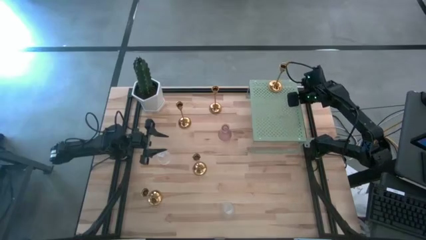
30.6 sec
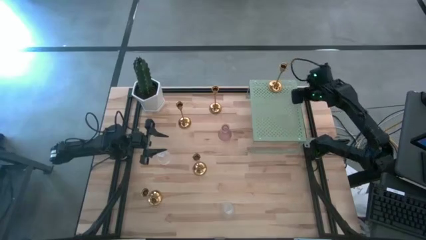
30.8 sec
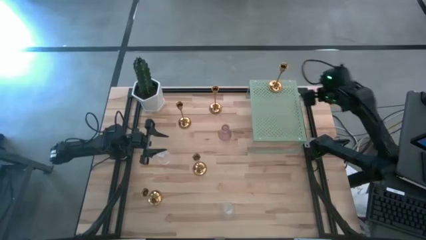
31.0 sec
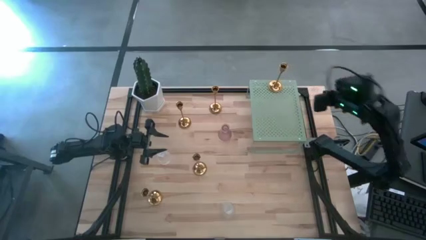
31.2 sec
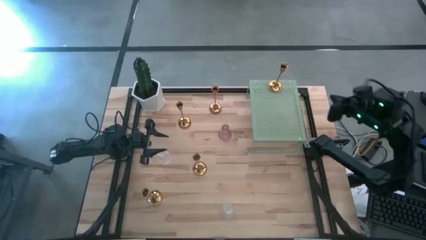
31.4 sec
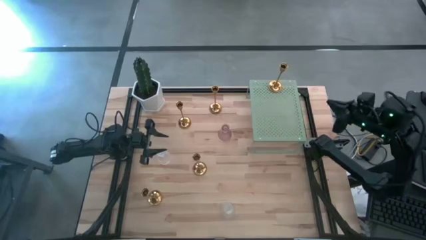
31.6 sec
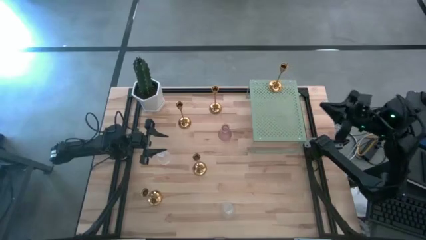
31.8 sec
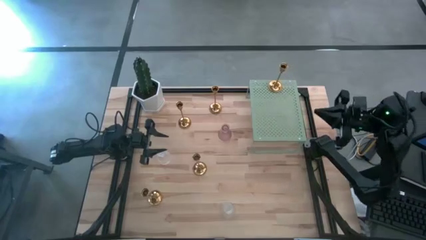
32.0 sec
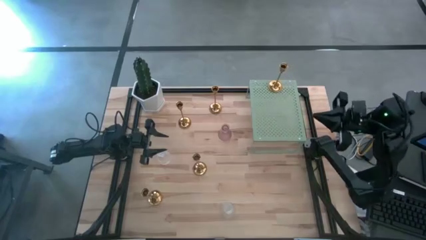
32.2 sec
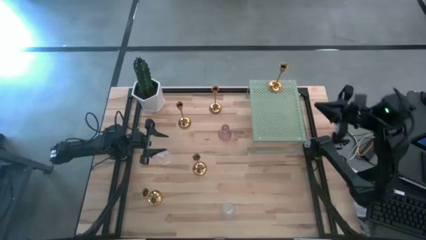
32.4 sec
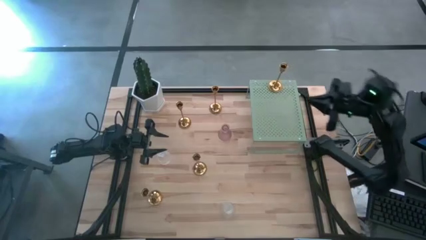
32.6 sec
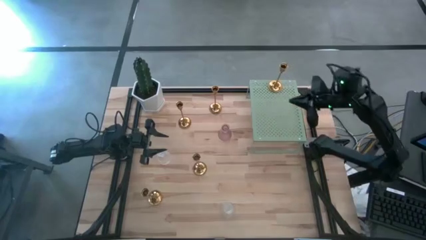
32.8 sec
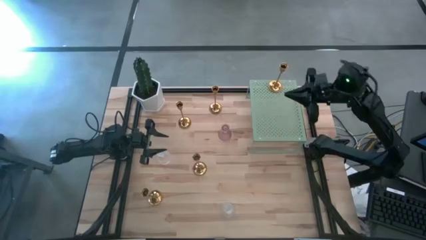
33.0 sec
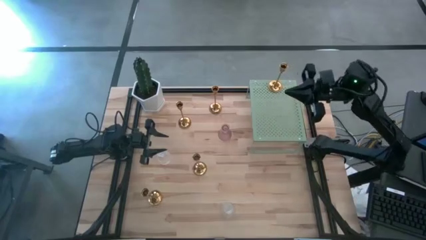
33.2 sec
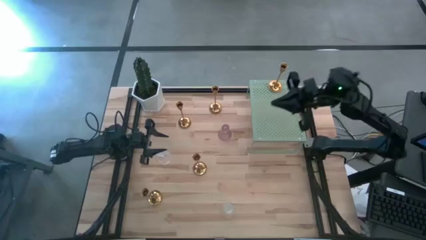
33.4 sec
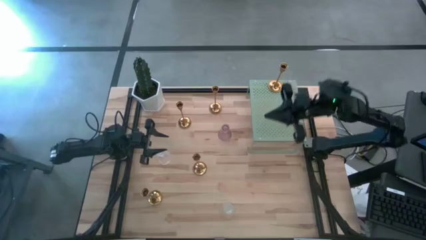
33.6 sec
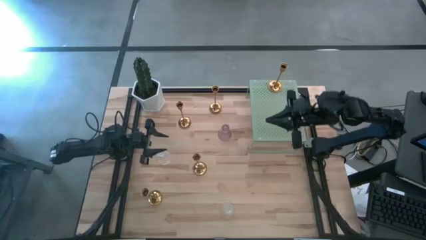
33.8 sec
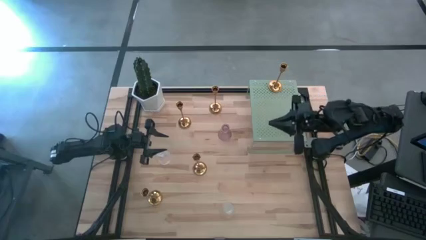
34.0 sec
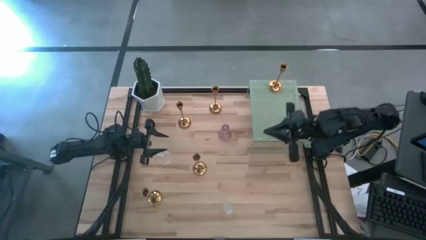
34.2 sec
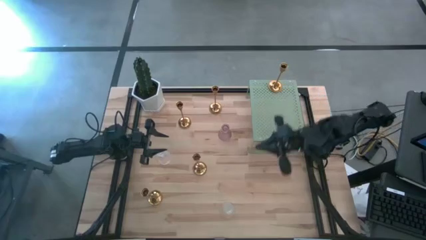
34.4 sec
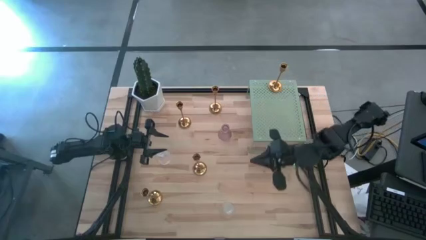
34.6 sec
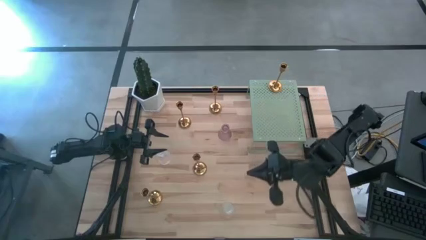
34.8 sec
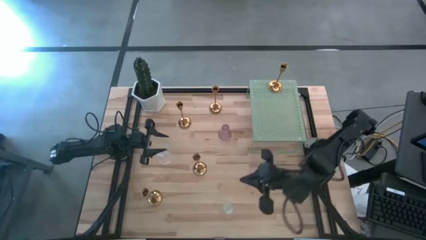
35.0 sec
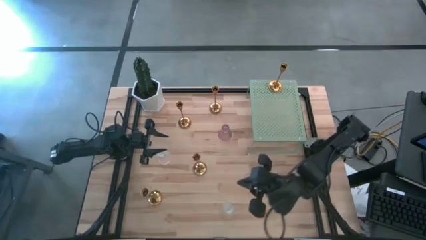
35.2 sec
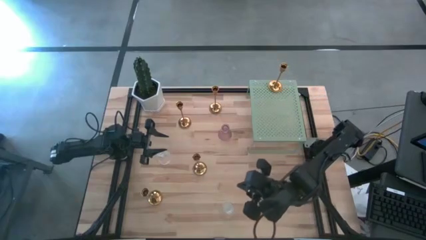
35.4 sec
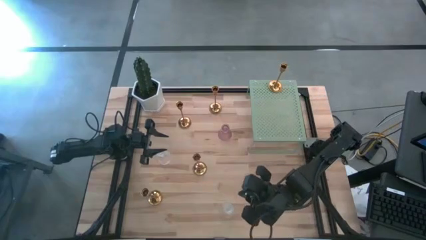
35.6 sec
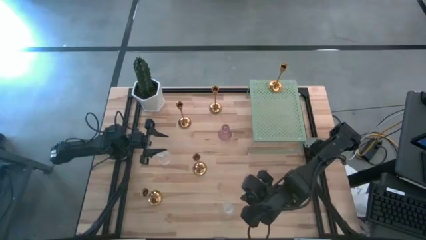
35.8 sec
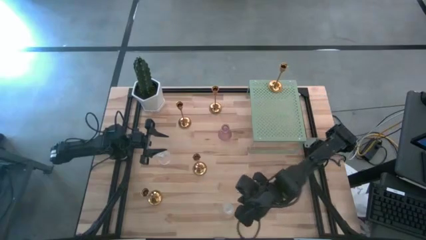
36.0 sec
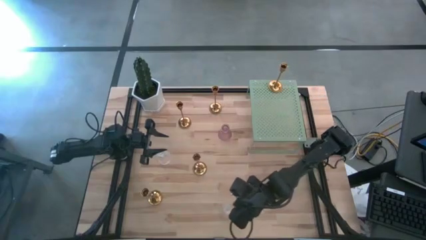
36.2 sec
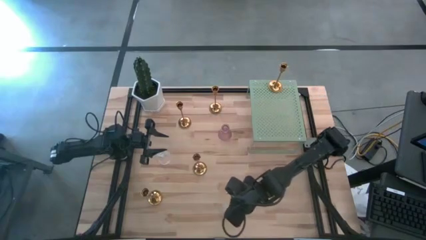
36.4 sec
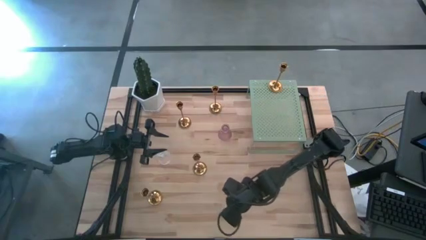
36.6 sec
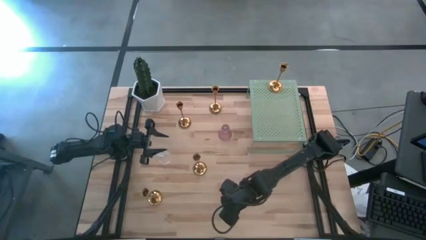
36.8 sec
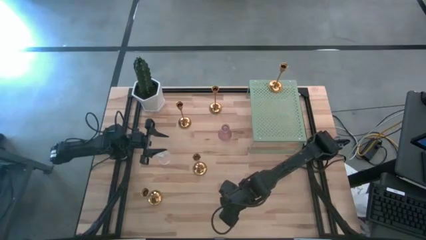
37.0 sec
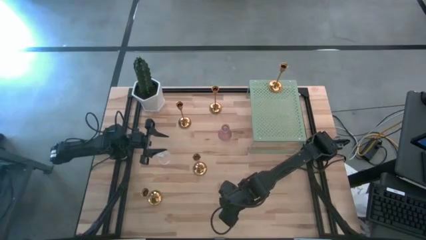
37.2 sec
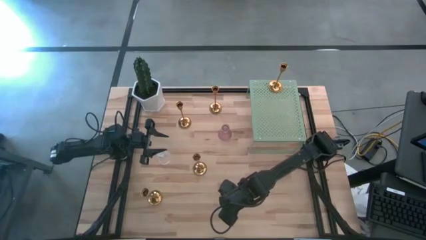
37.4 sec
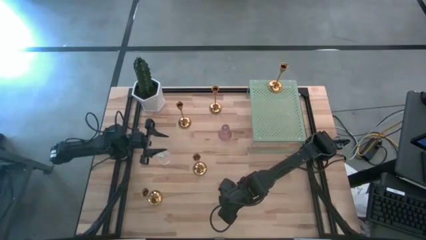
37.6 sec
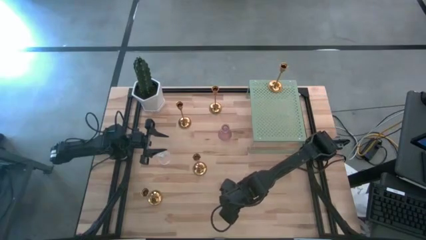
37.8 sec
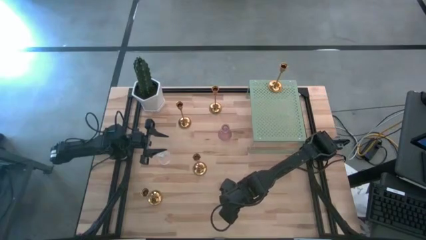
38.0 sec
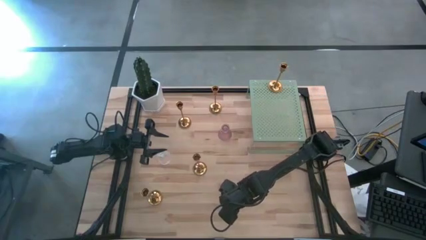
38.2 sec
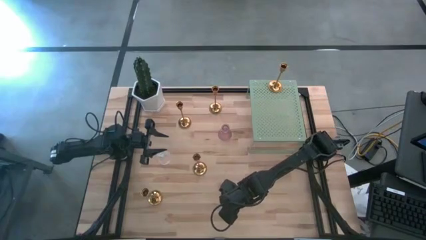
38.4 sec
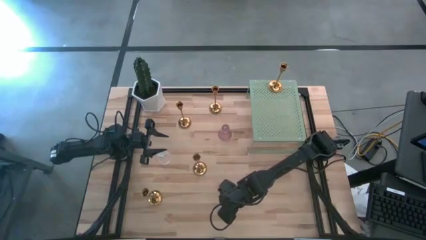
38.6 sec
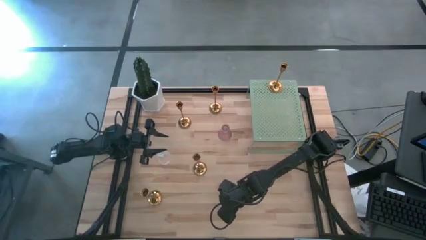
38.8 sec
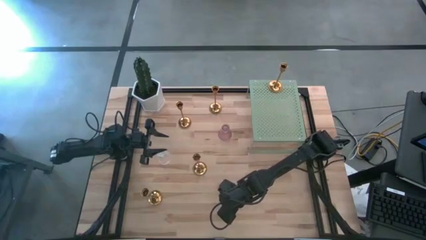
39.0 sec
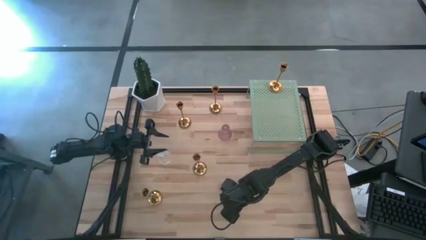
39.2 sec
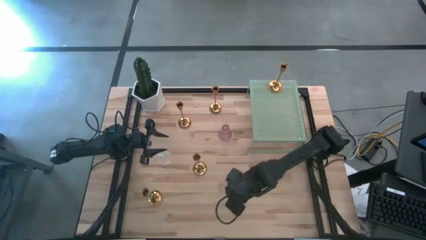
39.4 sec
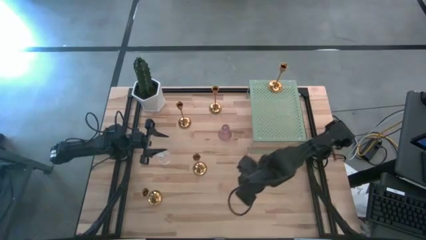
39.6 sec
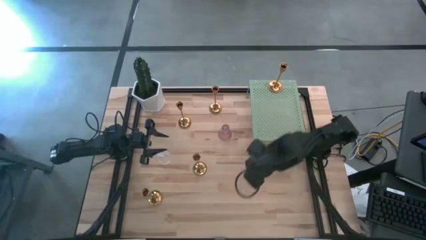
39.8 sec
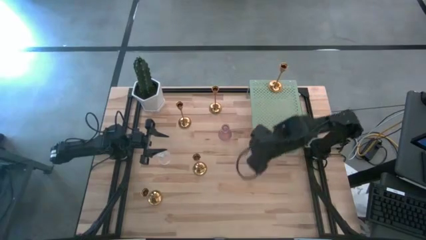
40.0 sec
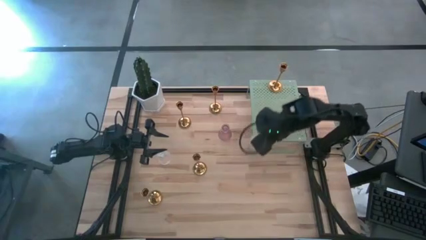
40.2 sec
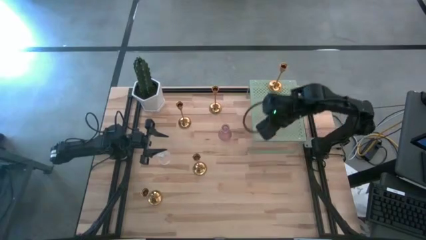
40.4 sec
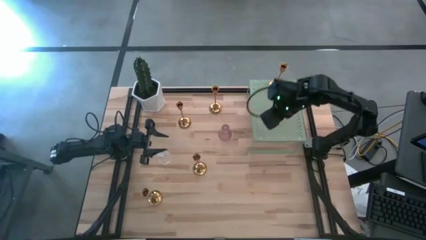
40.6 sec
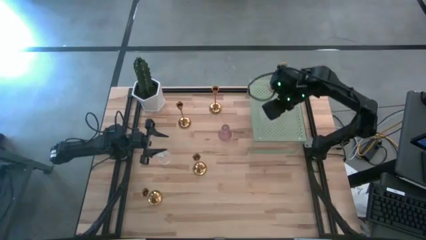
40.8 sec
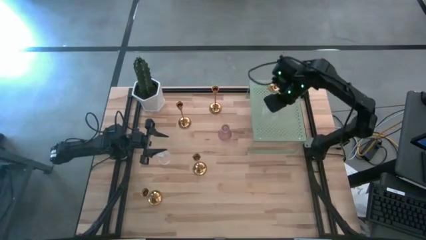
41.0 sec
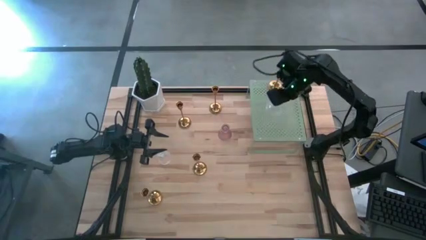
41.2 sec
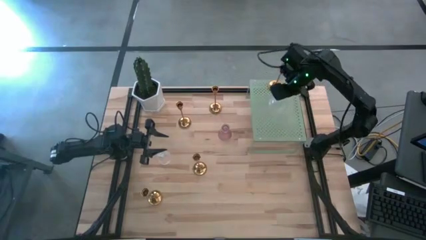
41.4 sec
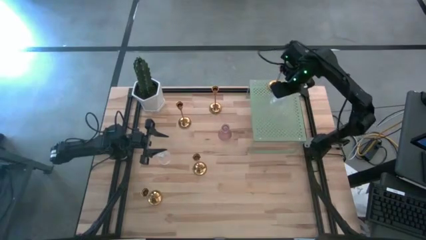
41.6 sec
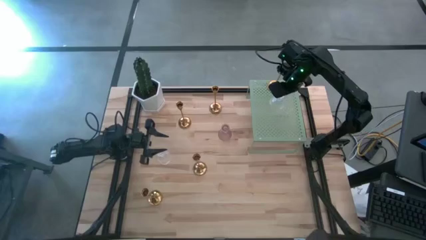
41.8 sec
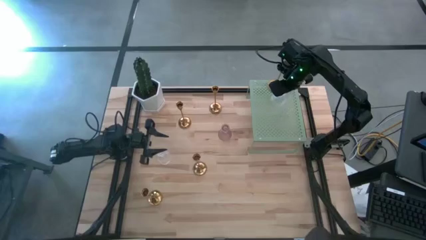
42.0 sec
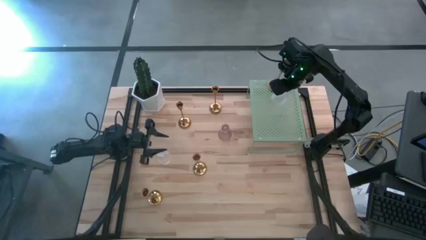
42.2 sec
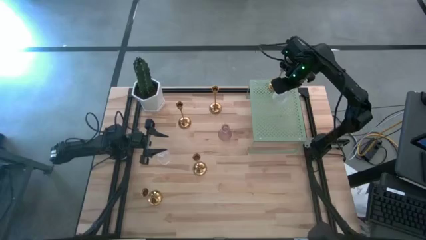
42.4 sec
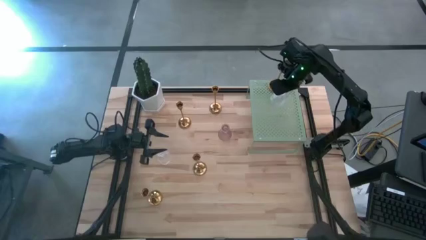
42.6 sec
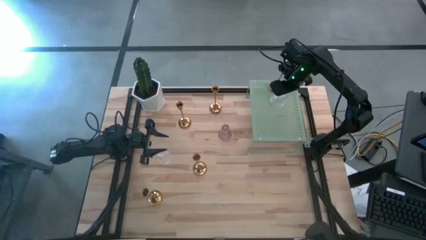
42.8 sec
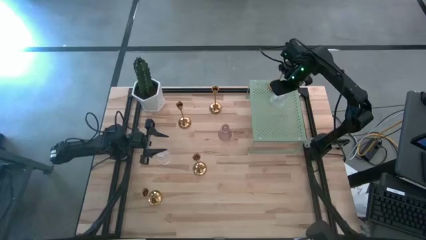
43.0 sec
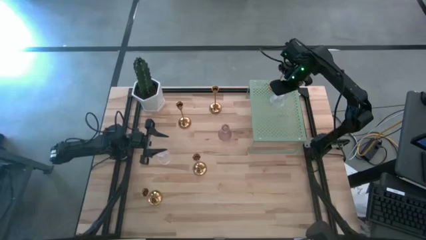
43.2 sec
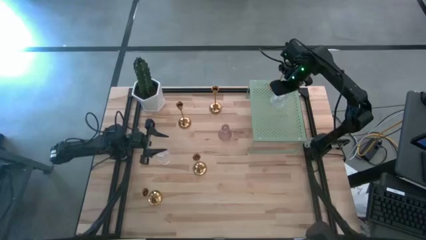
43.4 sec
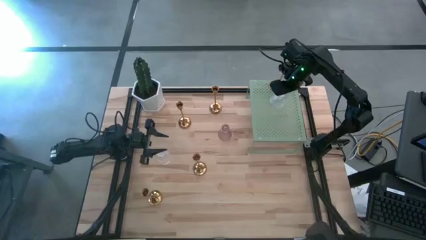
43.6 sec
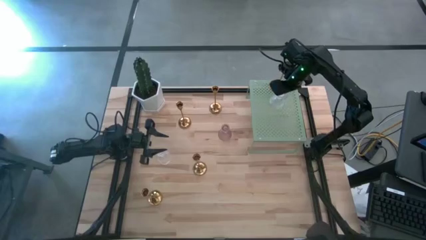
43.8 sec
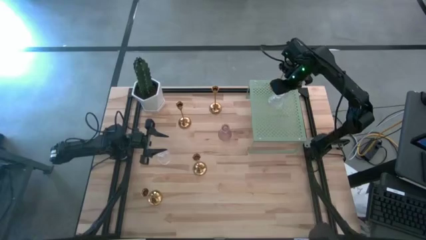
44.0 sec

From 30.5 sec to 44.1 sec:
Task: Pick & Place candle stick holders
Put the bottom transparent glass candle holder on the shelf

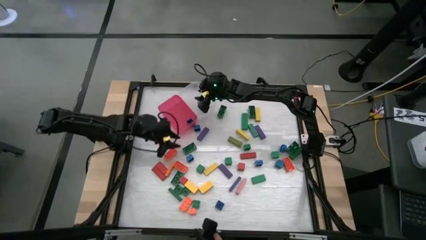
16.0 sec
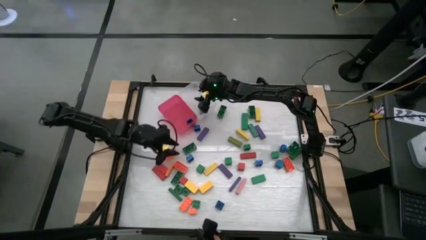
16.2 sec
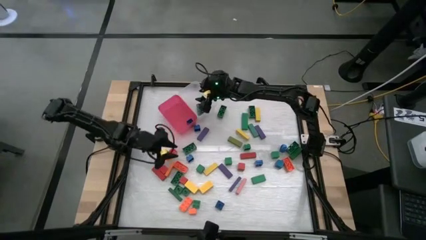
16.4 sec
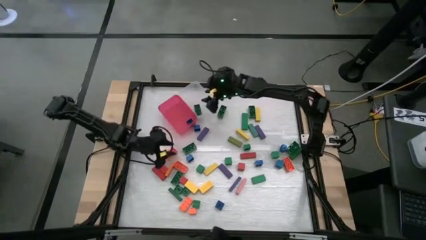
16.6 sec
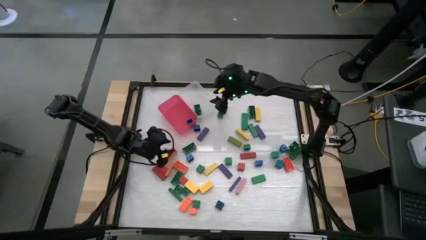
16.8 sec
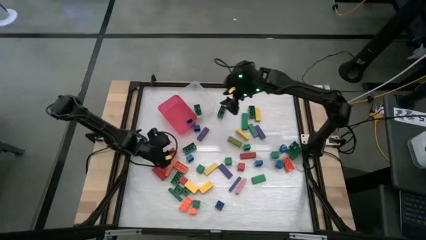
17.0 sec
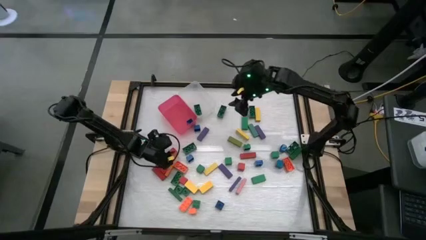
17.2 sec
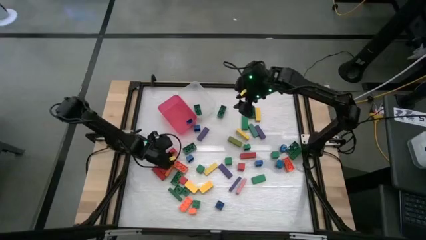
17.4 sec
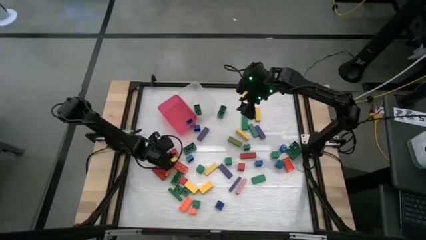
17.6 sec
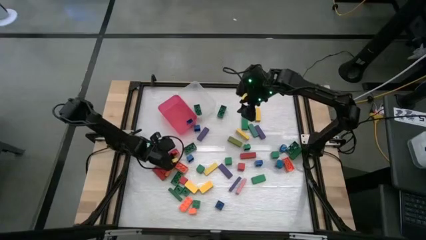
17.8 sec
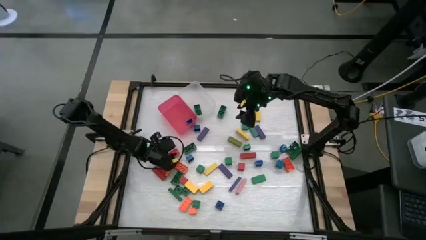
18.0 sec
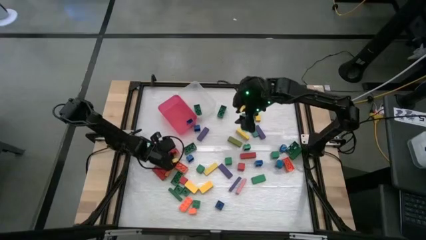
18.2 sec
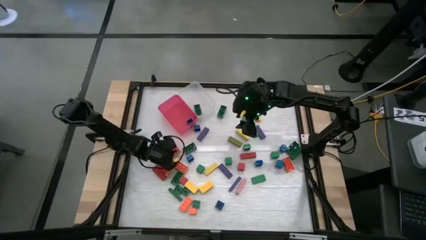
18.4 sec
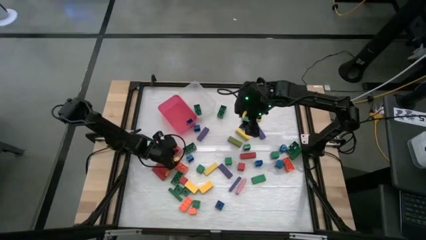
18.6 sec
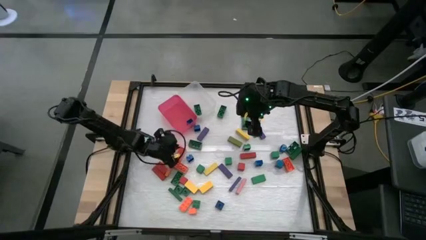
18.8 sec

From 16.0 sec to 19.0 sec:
Task: Sort blocks by size
Put the big orange game piece into the white bin
